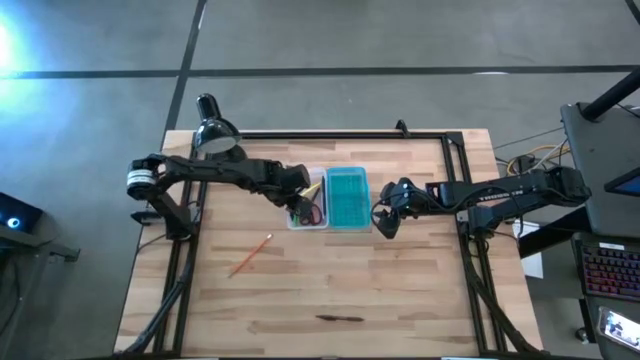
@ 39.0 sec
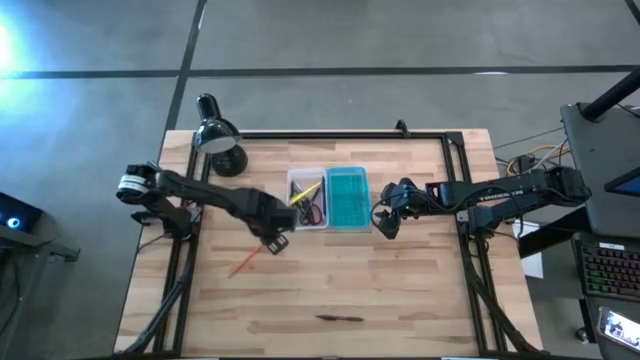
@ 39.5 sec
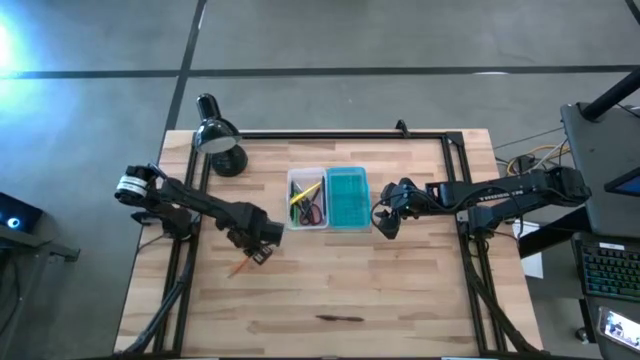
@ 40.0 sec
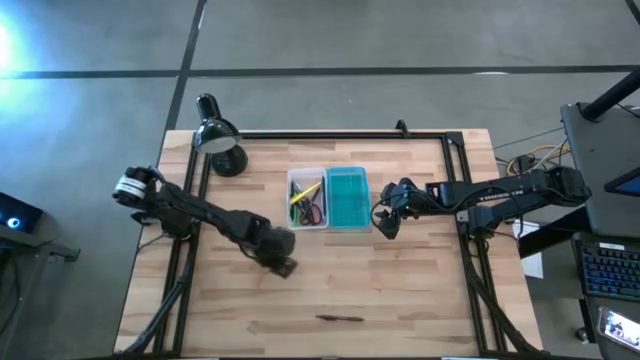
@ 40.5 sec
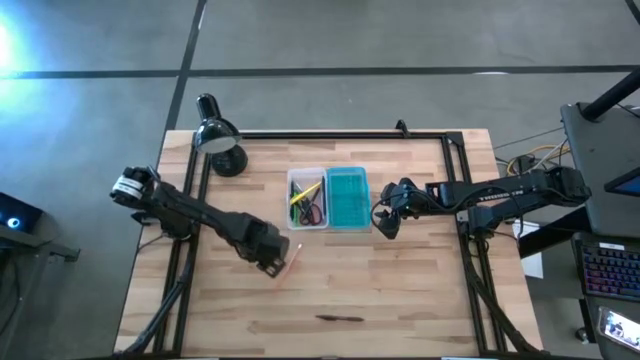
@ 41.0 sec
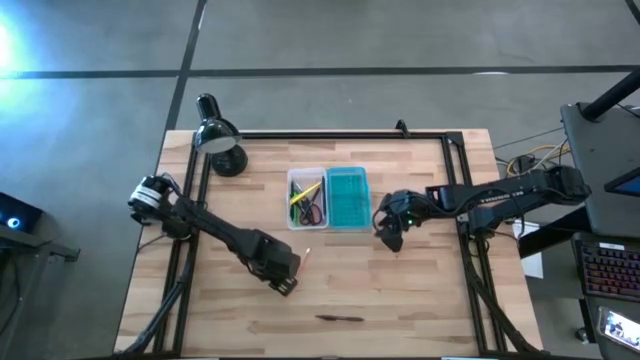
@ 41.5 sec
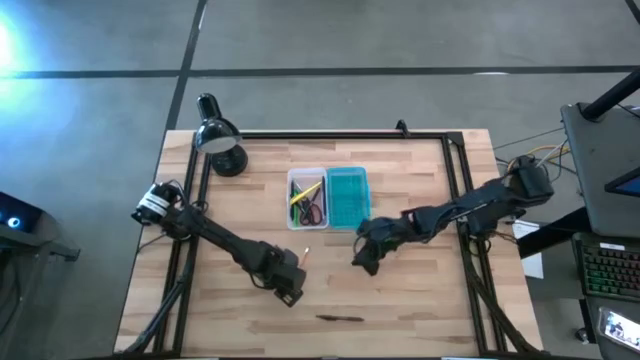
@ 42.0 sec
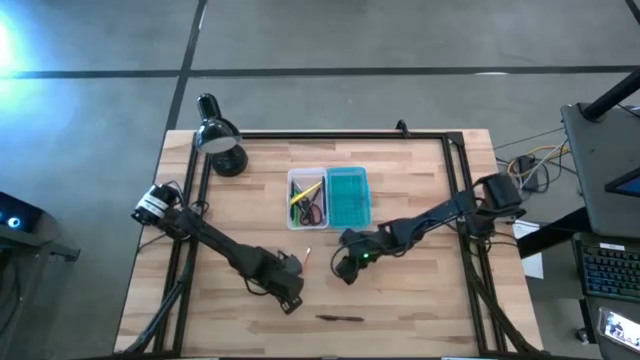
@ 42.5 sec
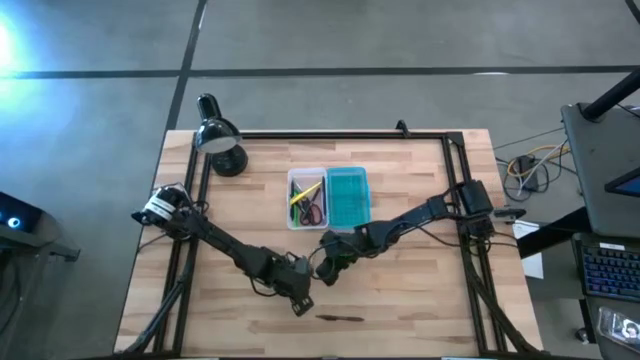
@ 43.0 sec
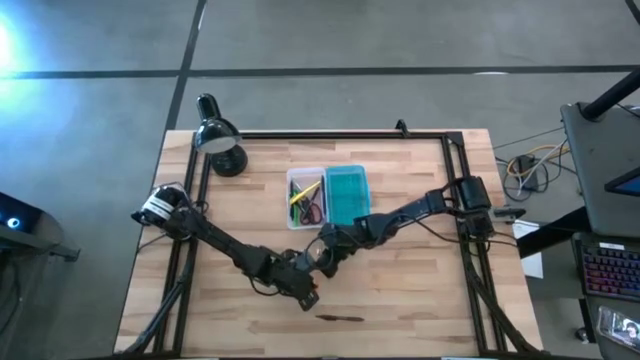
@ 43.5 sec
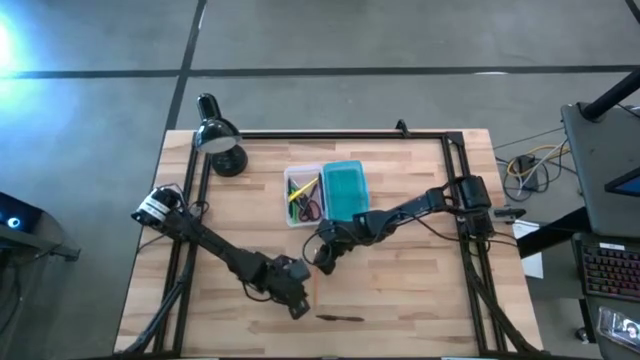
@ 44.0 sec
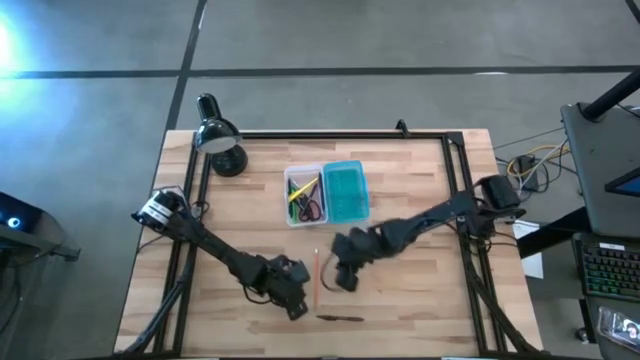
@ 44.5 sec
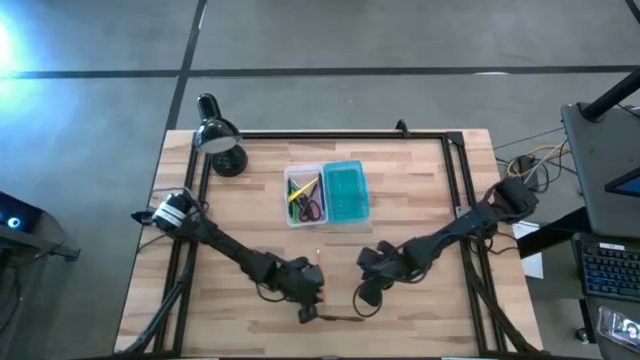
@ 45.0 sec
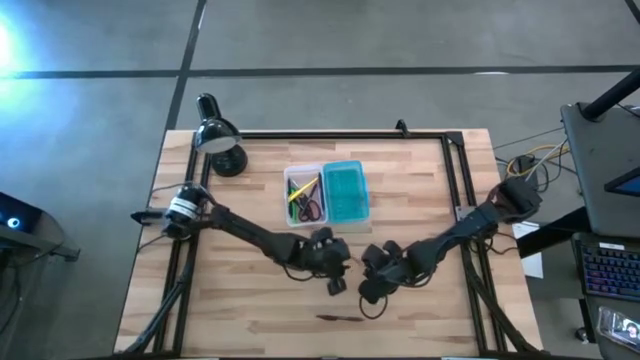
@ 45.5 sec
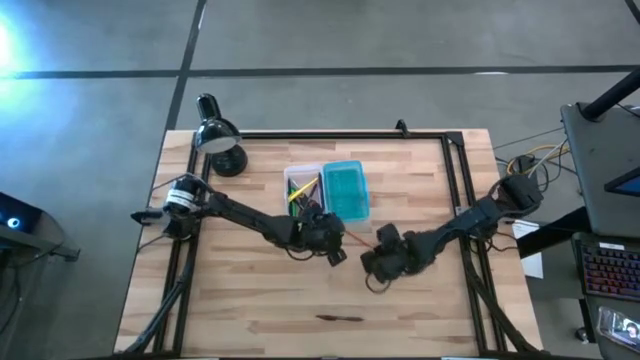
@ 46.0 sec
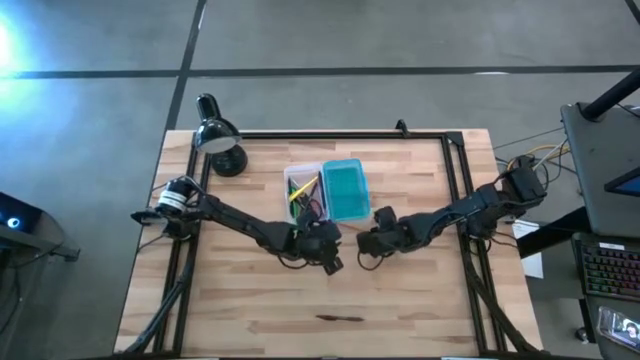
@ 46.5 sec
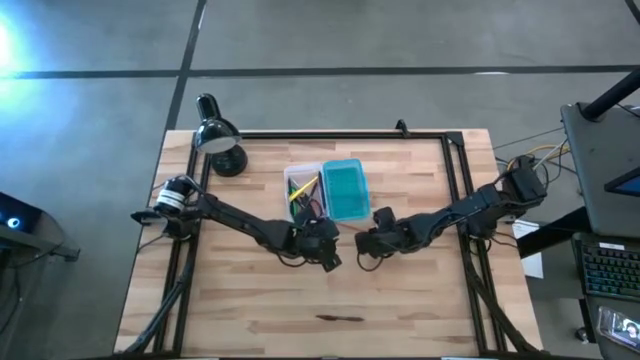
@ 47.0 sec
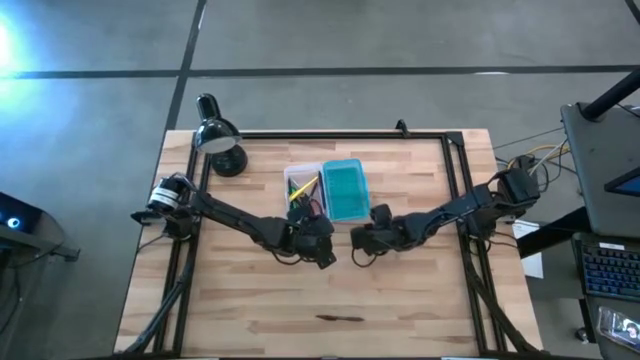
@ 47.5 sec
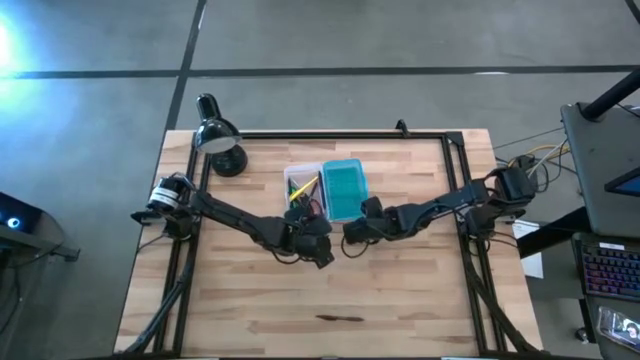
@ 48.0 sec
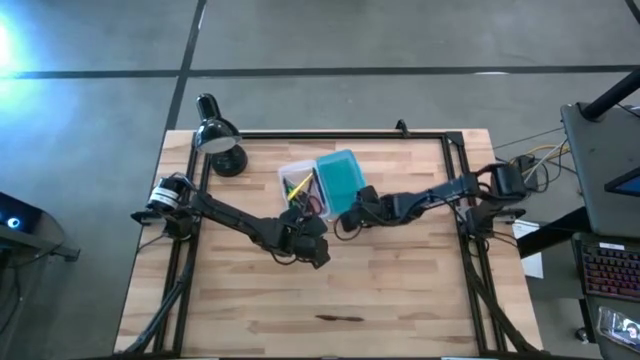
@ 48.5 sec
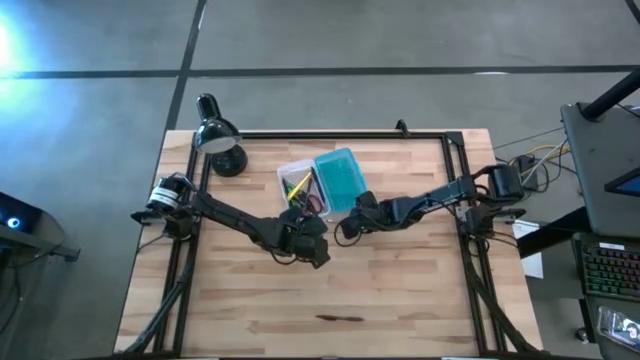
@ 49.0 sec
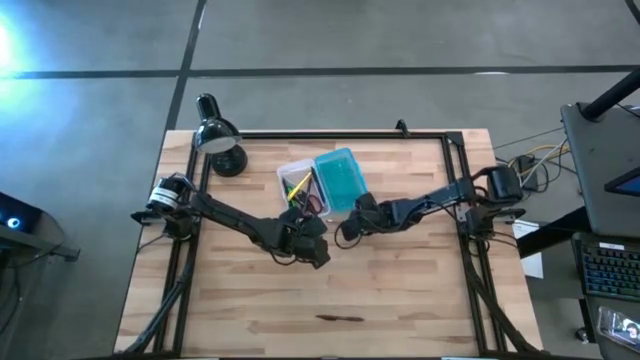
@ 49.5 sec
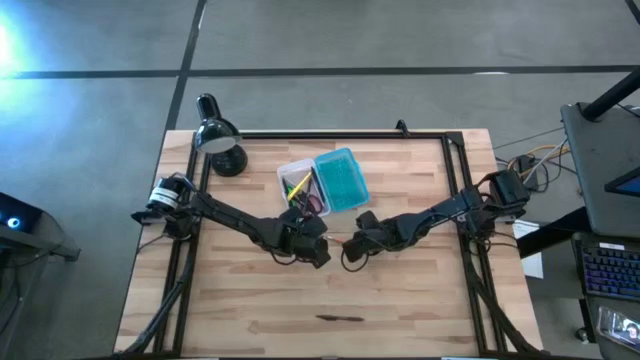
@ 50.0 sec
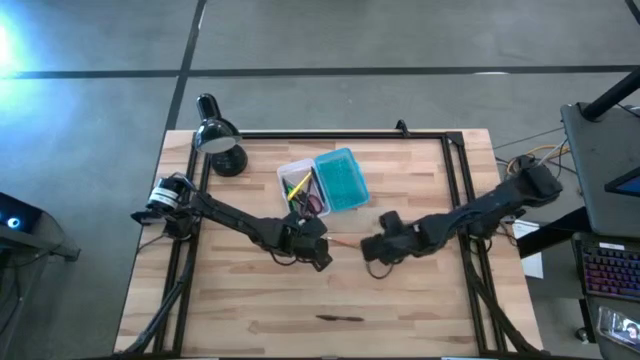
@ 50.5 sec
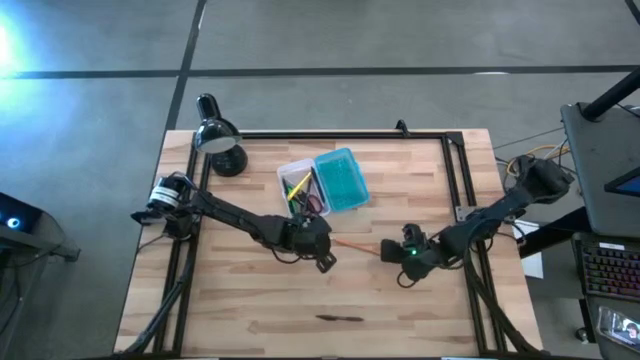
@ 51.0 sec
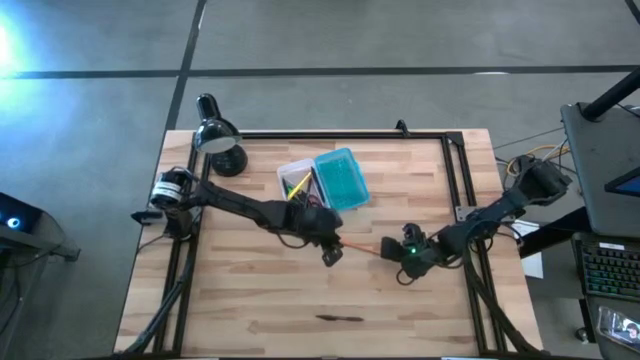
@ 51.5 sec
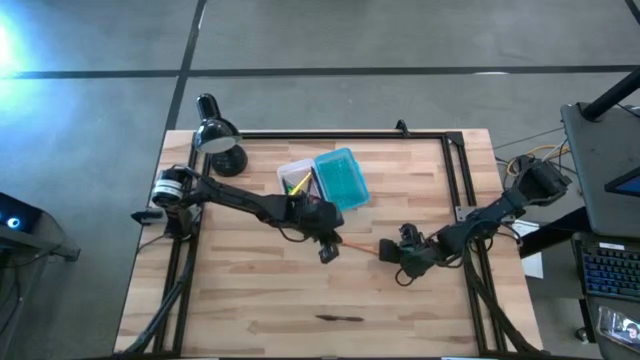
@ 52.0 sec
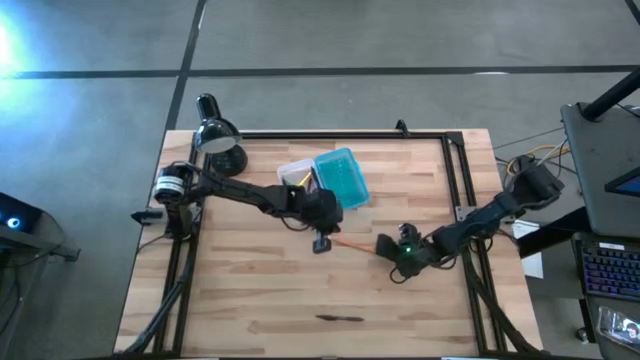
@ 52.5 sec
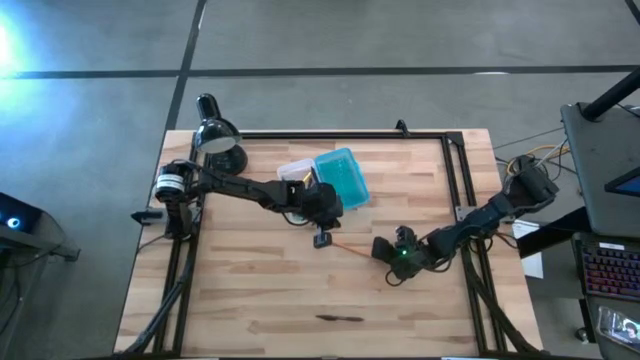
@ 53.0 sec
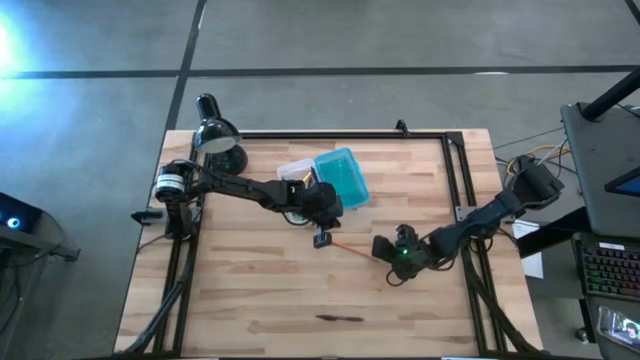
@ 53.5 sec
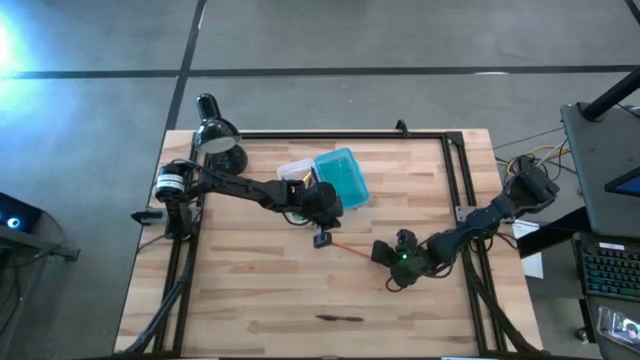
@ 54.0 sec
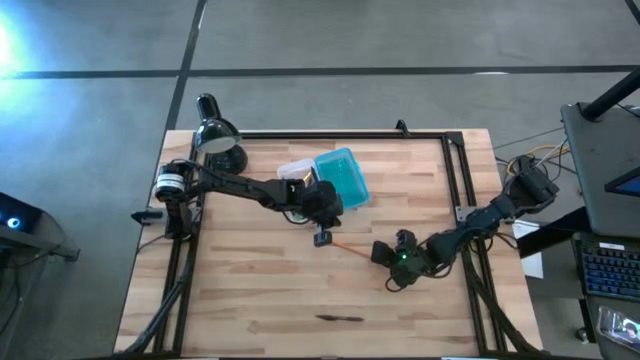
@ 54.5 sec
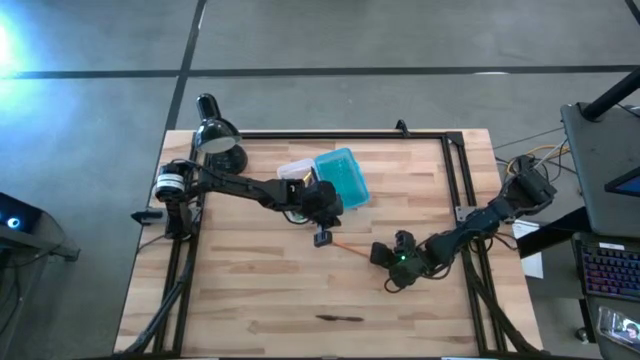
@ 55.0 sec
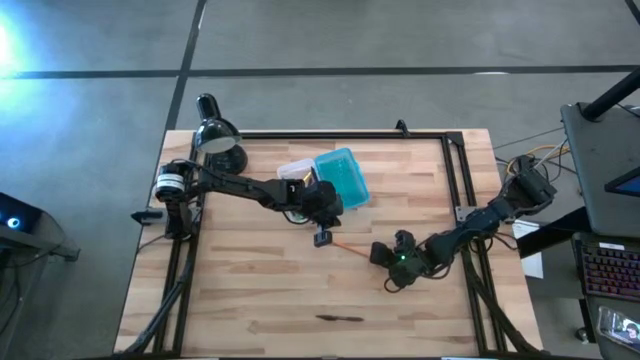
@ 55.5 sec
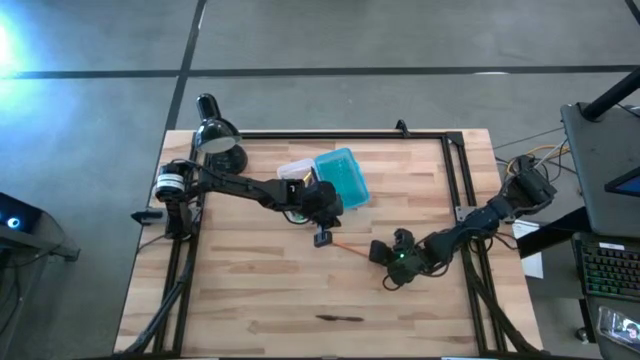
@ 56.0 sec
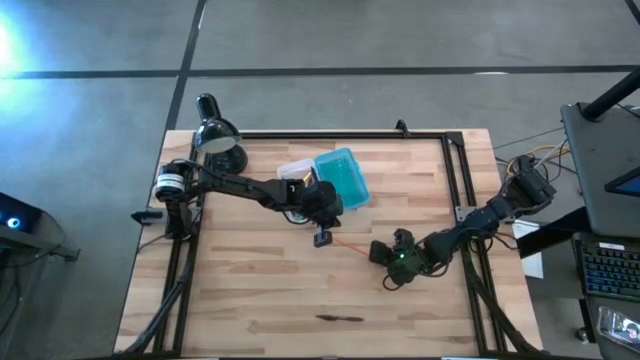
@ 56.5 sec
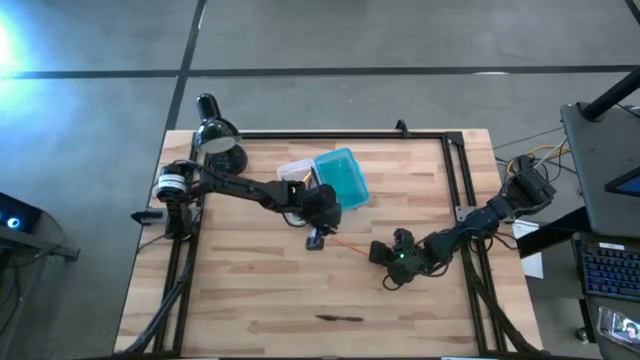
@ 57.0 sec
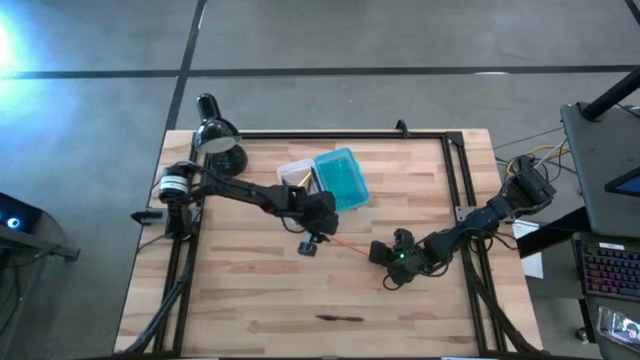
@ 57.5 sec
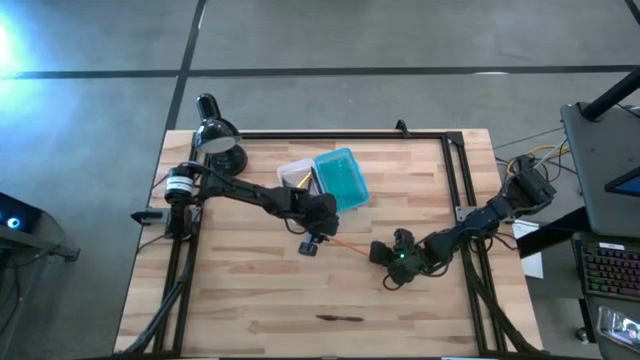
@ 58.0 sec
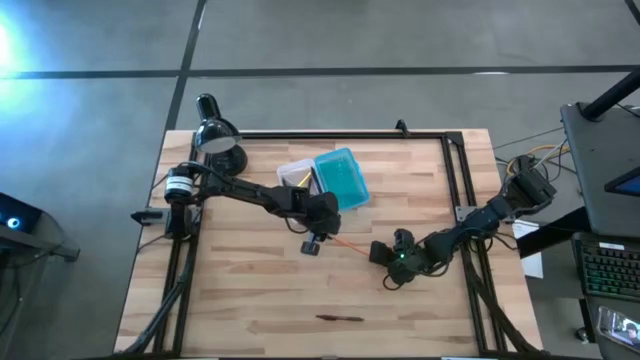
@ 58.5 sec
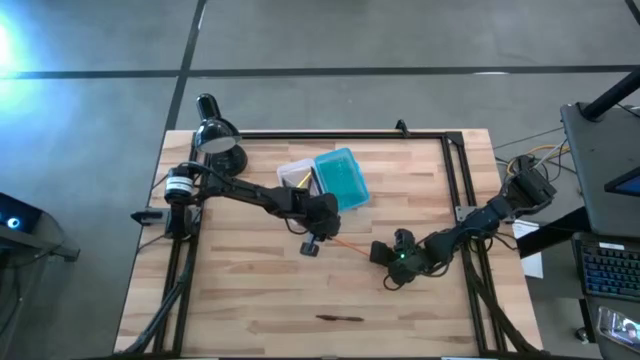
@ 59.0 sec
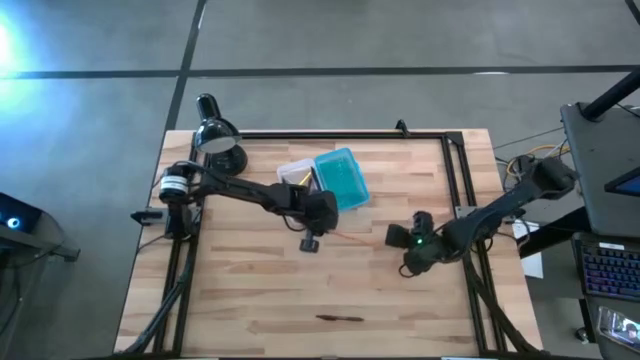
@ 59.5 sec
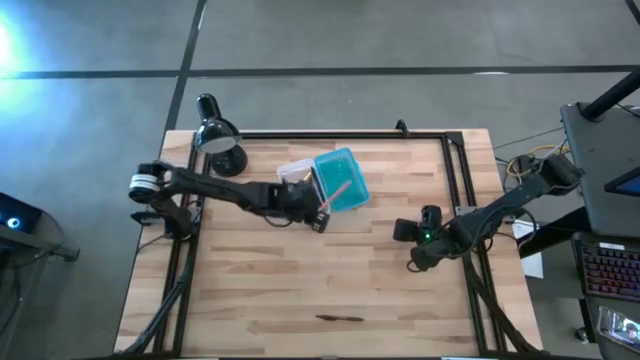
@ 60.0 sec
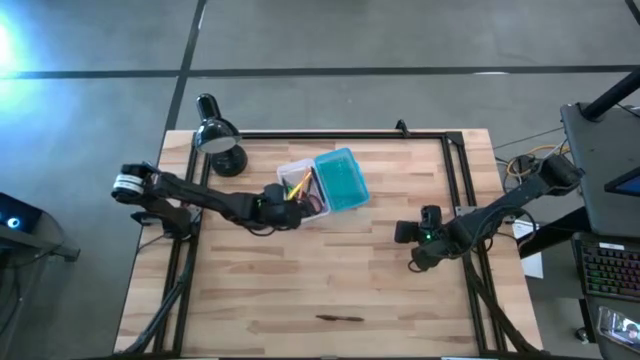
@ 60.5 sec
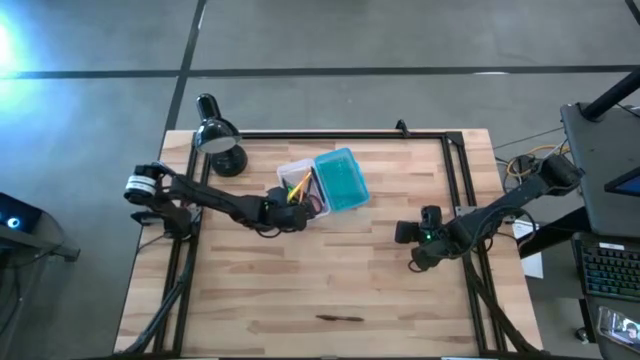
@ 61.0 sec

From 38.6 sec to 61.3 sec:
Task: Pick & place school supplies into a supply box
Put the orange pencil into the supply box
